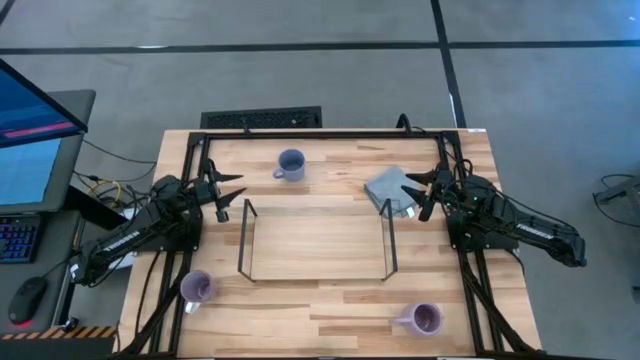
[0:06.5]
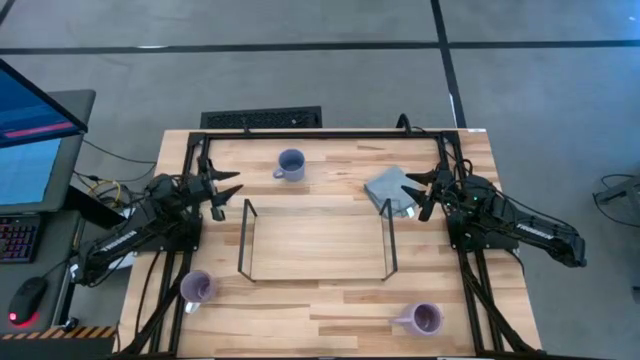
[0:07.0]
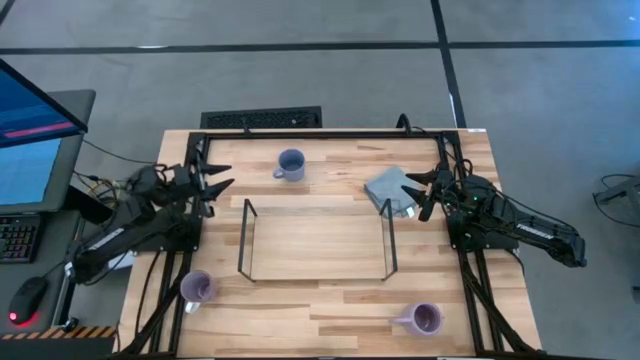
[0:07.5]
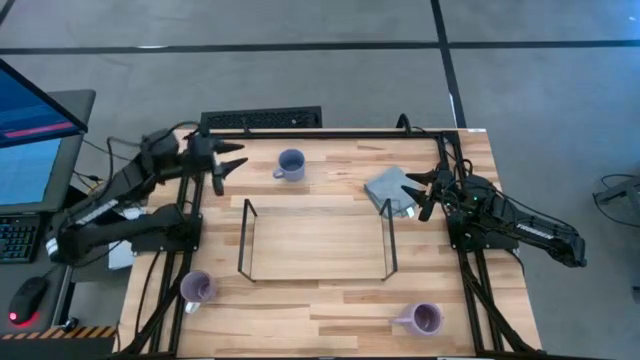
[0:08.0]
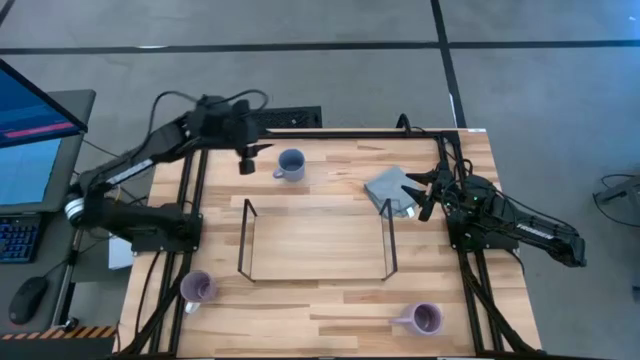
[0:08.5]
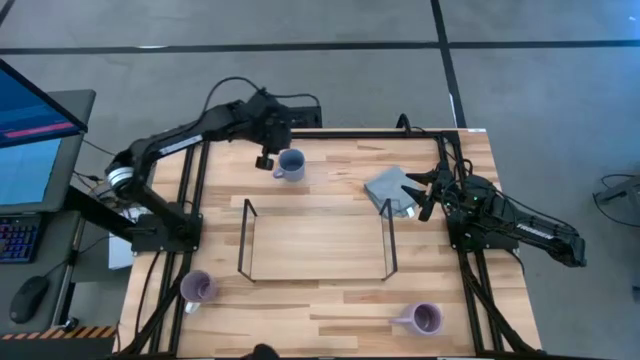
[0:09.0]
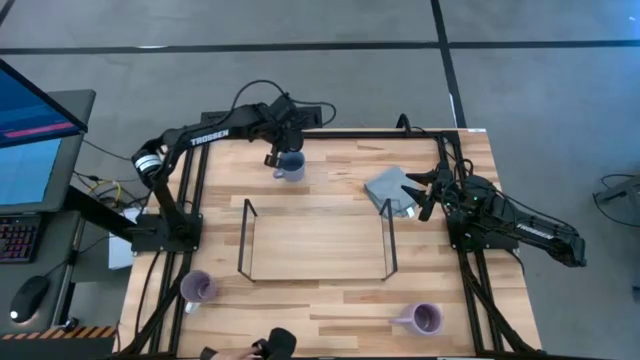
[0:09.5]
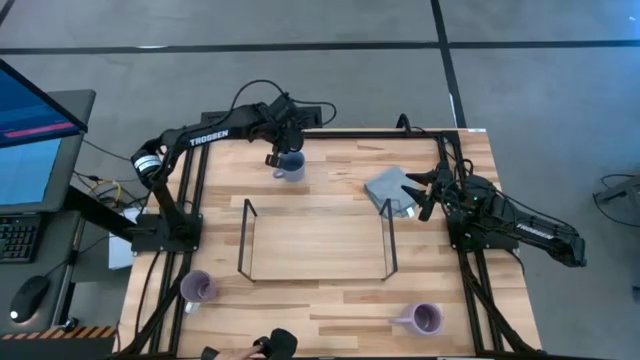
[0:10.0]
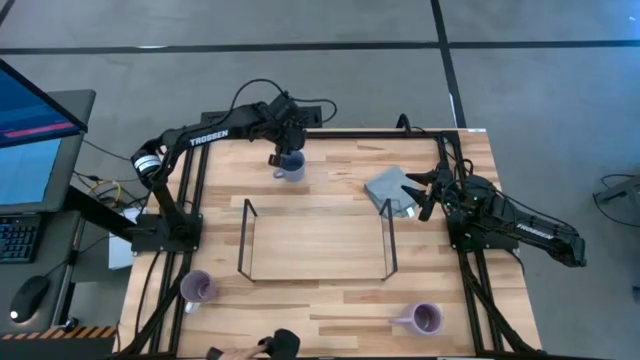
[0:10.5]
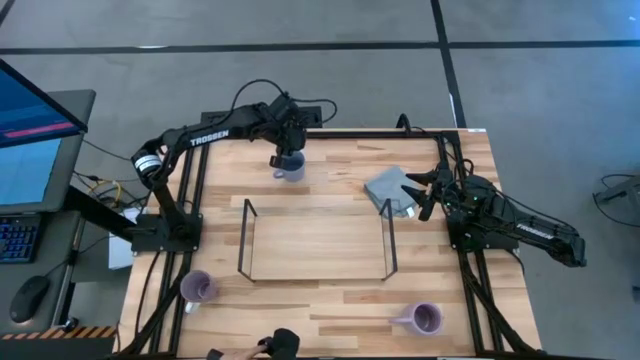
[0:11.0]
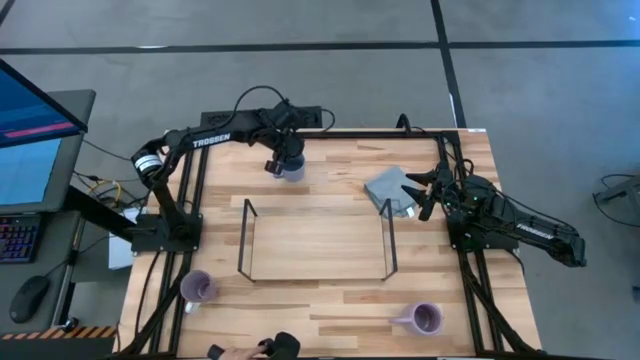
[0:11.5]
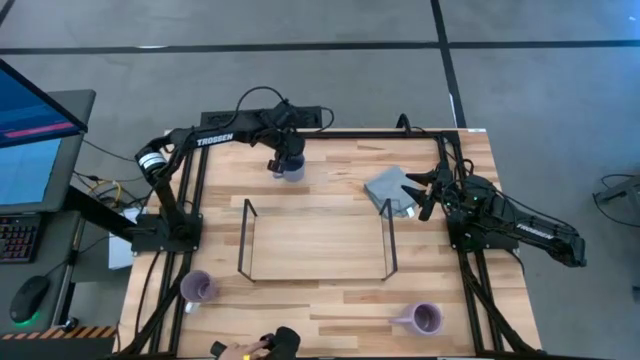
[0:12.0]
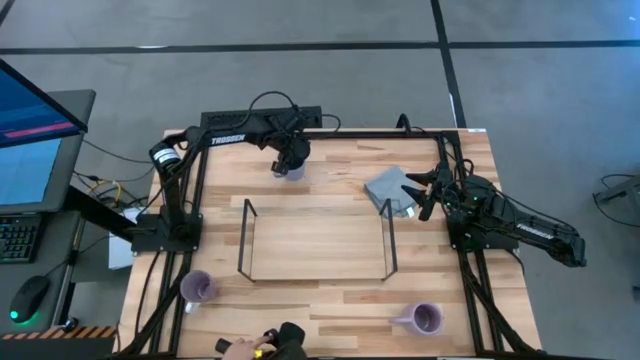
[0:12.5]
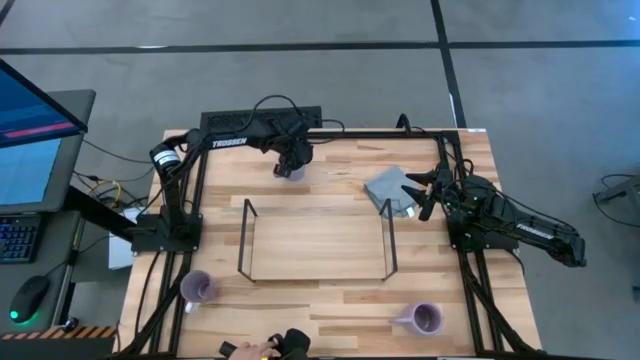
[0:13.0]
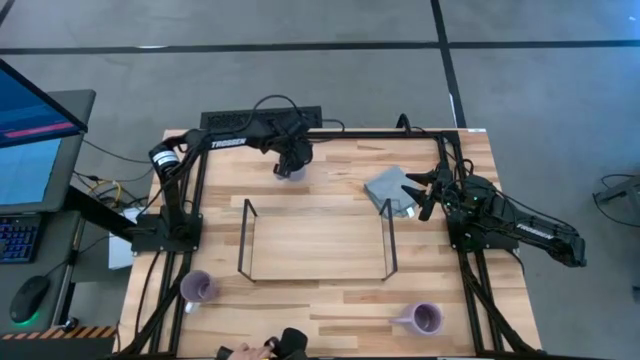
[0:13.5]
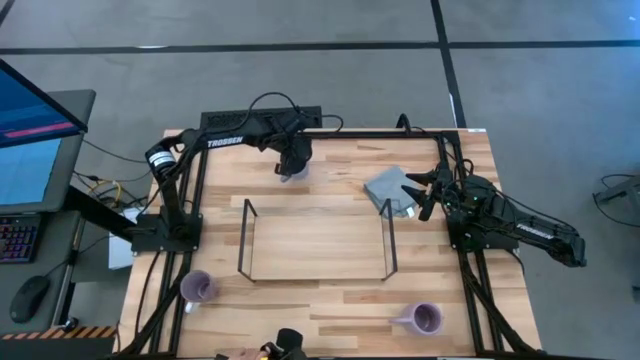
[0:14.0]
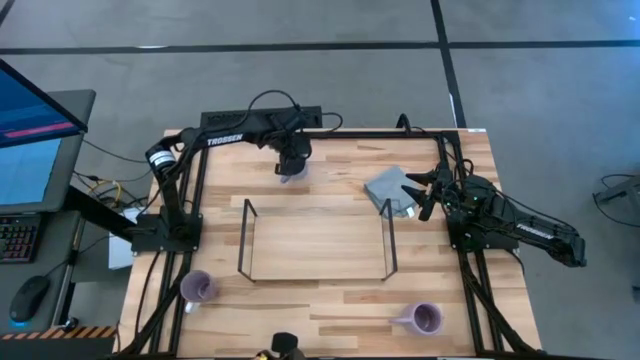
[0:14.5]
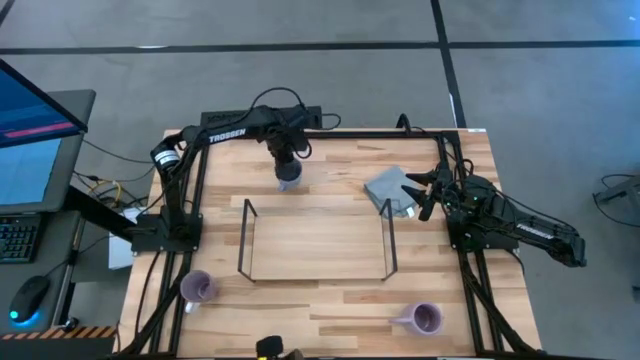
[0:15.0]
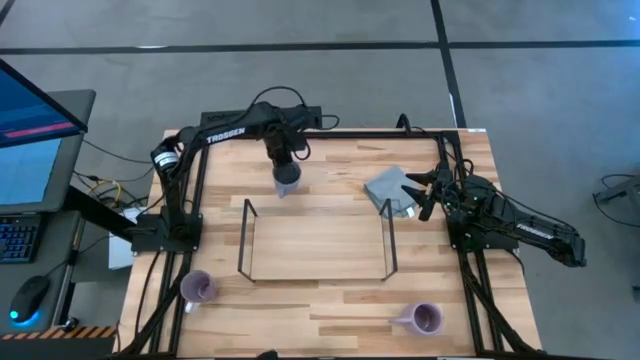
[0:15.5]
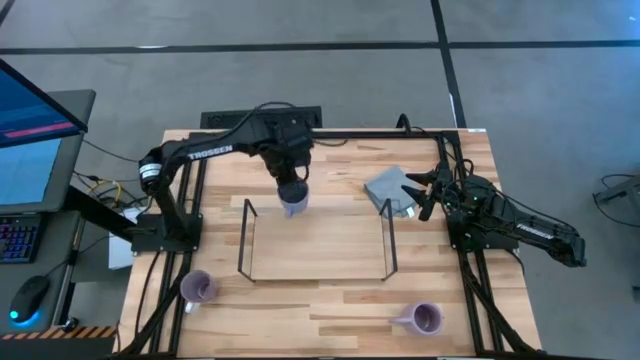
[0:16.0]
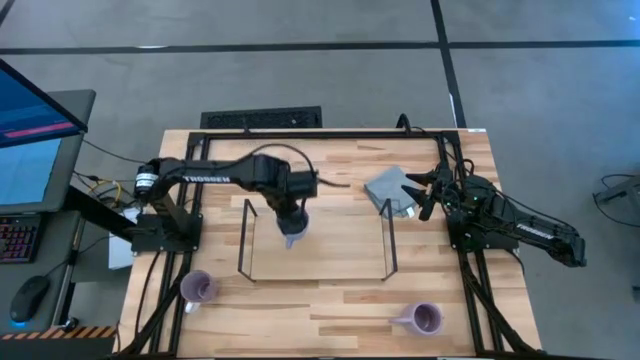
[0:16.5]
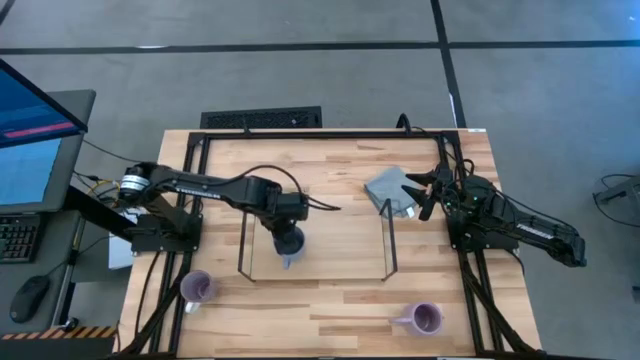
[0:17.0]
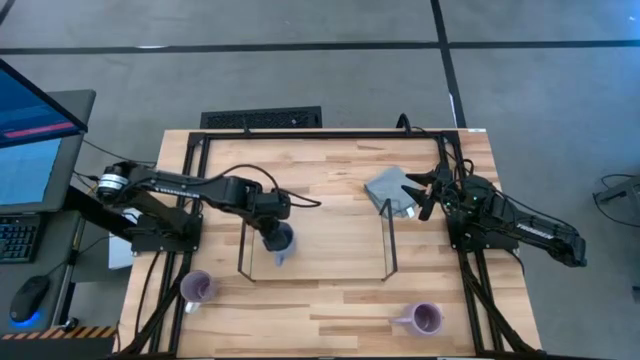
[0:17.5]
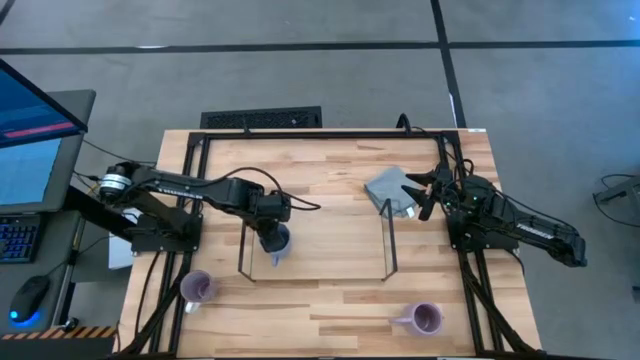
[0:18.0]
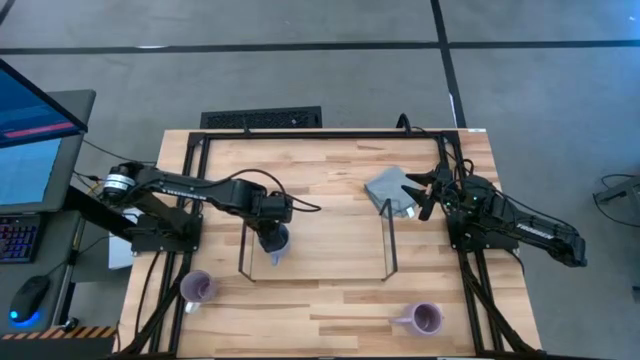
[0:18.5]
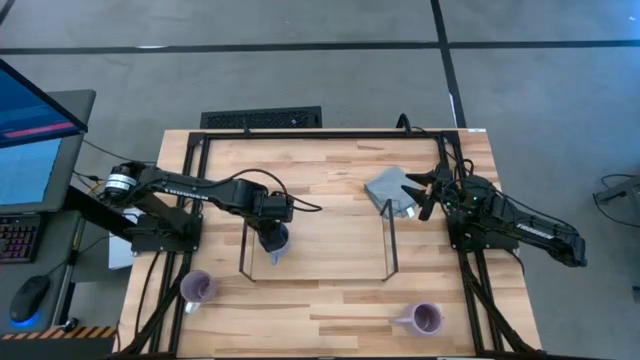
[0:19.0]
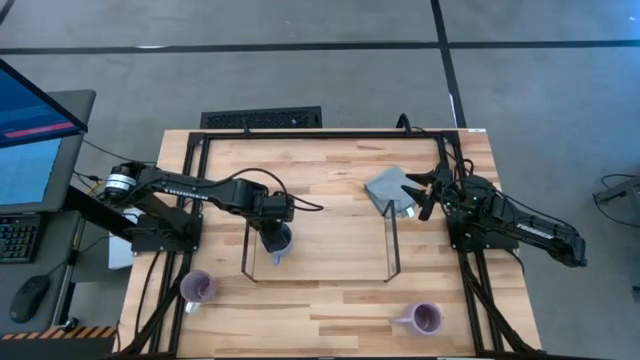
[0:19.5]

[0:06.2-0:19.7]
Task: Stack small to large cups/mugs on shelf
Put the blue mug on the shelf

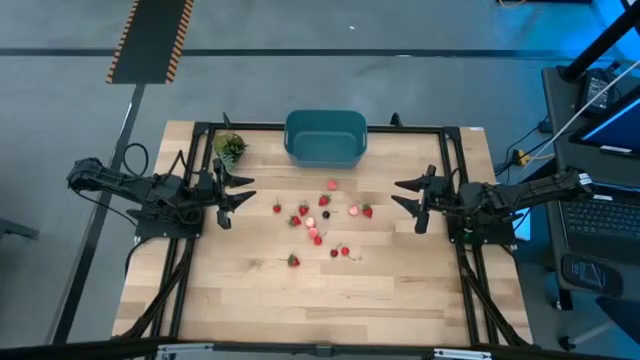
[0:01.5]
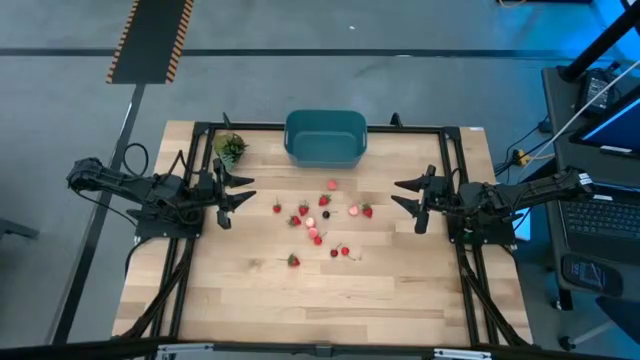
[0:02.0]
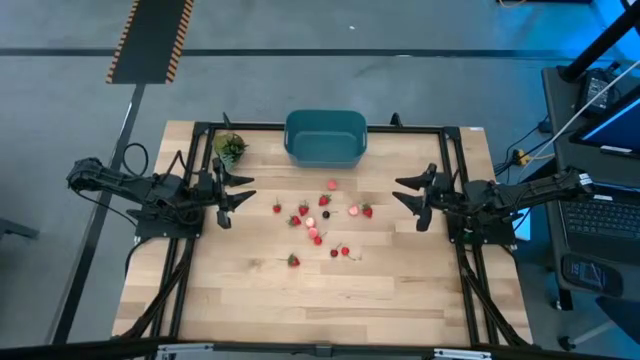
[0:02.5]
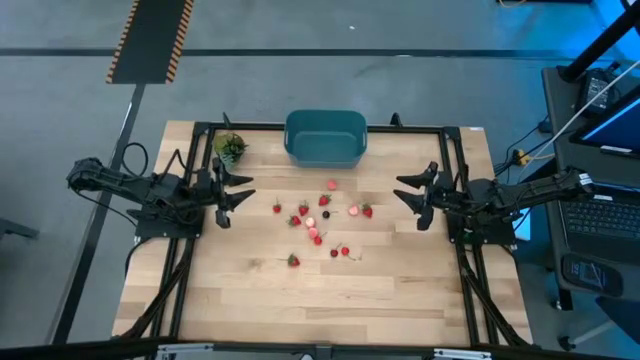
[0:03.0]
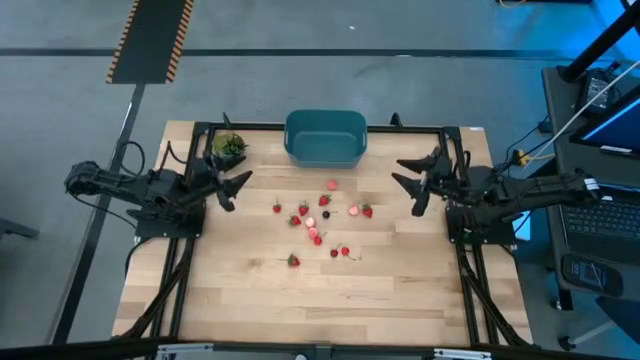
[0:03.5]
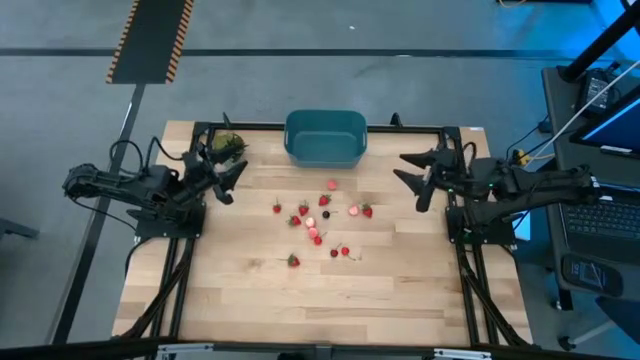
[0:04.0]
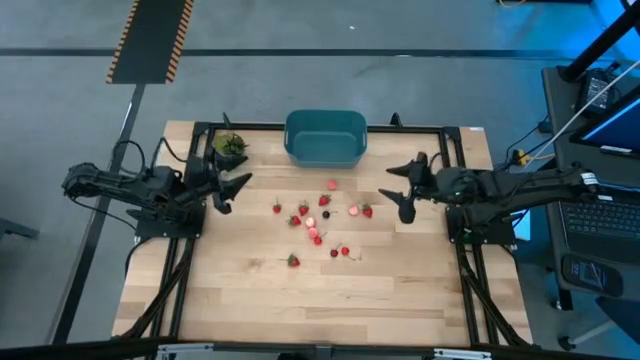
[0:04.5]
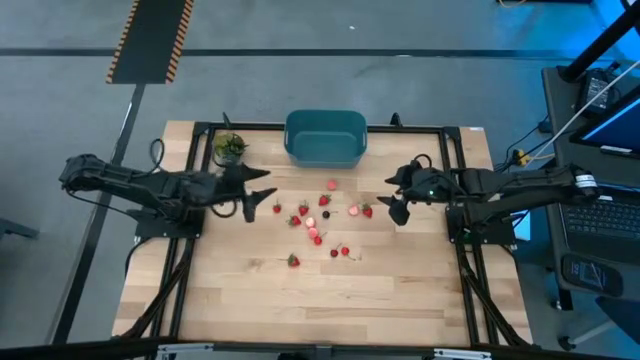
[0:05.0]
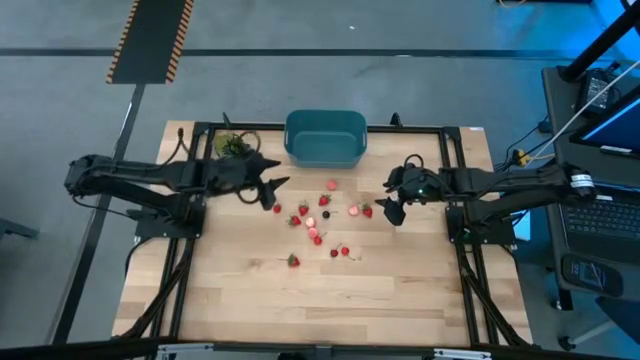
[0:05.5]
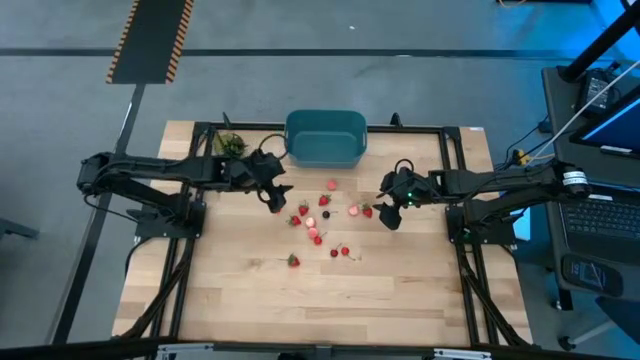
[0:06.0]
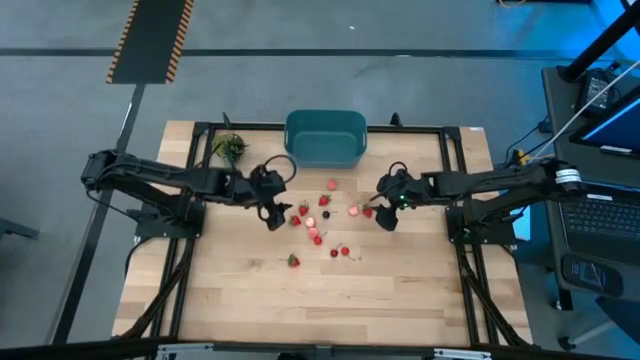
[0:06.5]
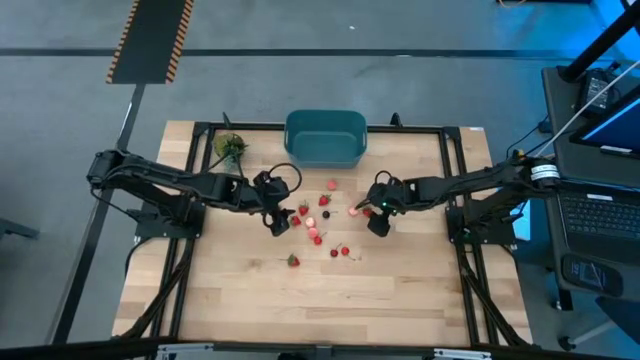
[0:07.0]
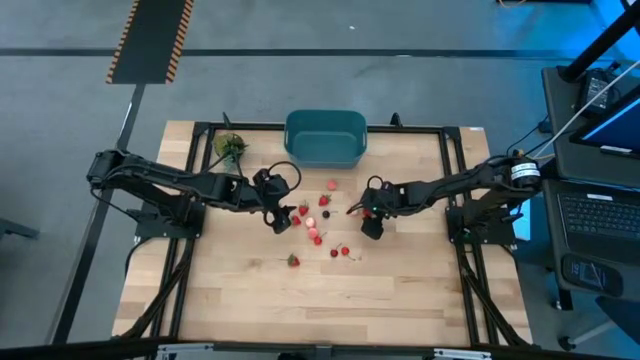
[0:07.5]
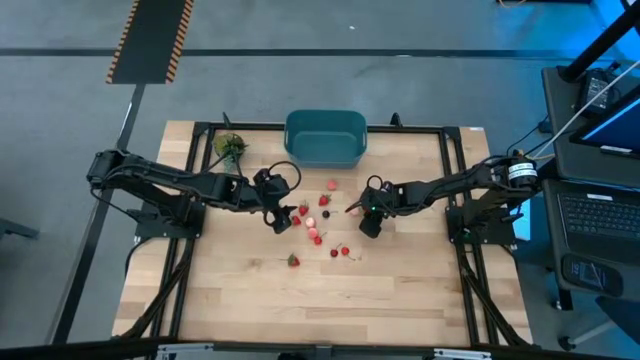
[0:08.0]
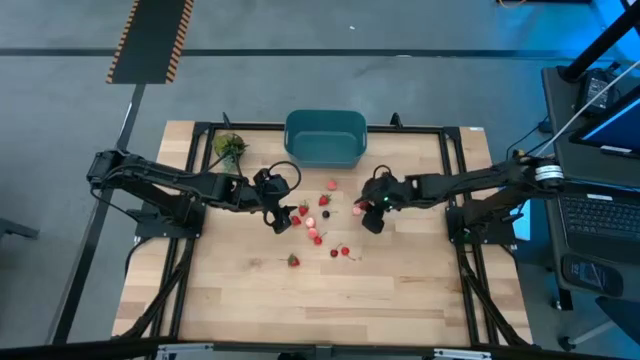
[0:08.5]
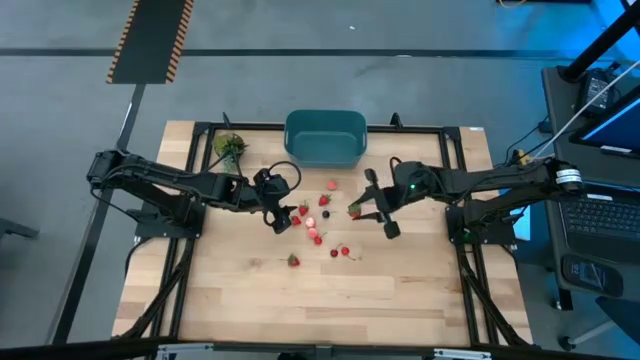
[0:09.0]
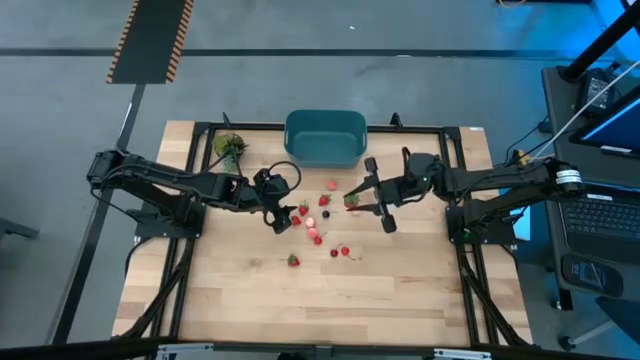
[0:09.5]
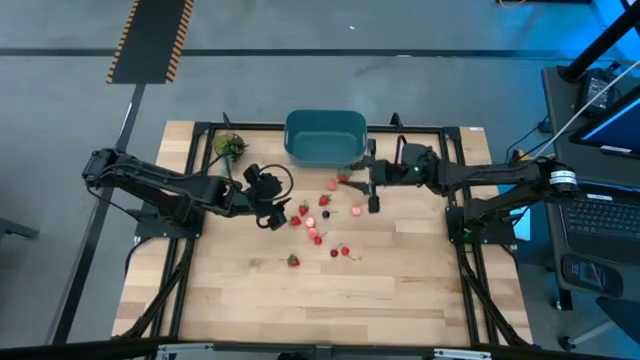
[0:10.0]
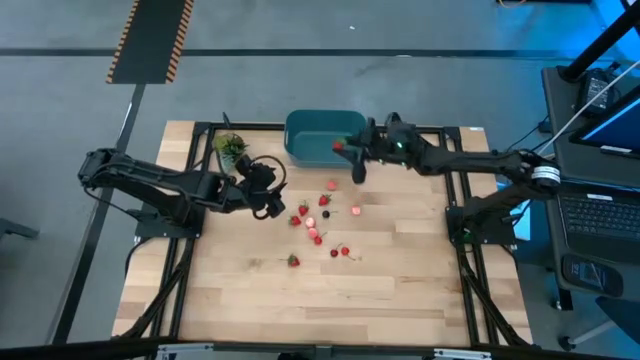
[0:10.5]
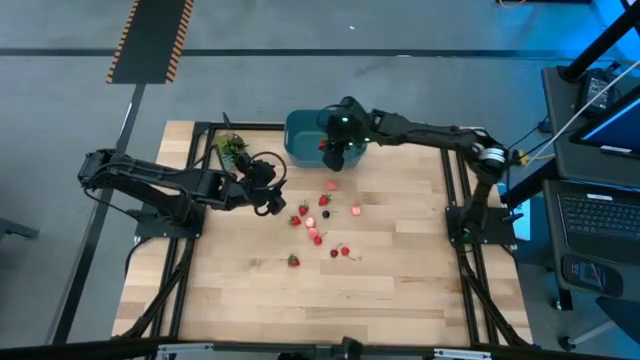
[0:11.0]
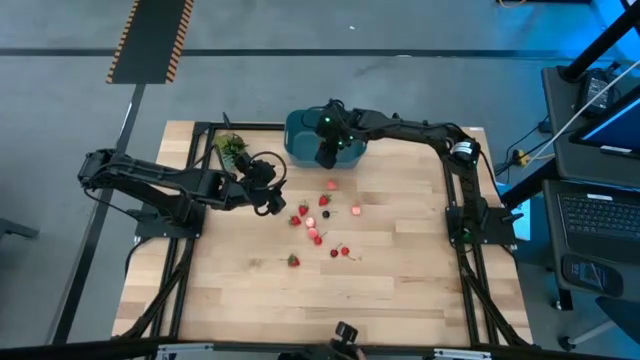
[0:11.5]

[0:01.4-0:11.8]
Task: Pick and placing Produce into tupperware
Put the strawberry into the blue bin
